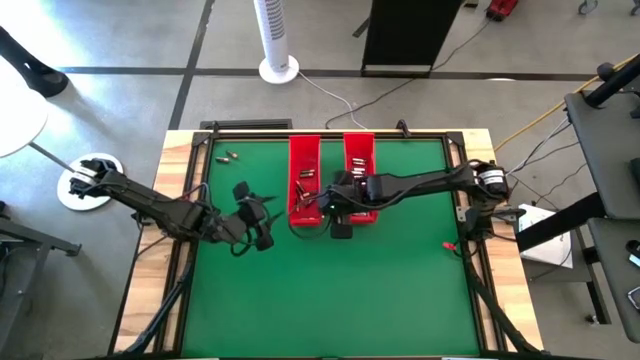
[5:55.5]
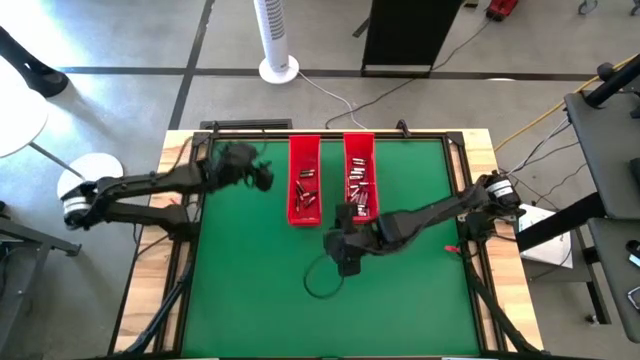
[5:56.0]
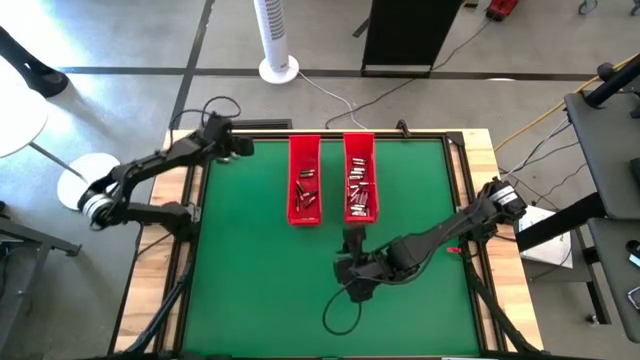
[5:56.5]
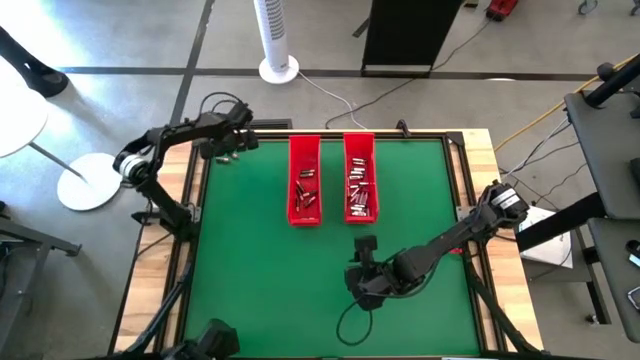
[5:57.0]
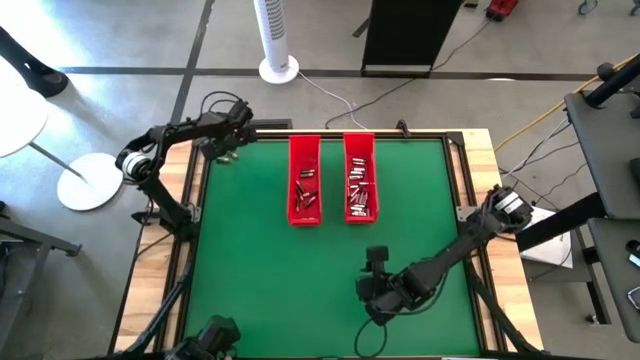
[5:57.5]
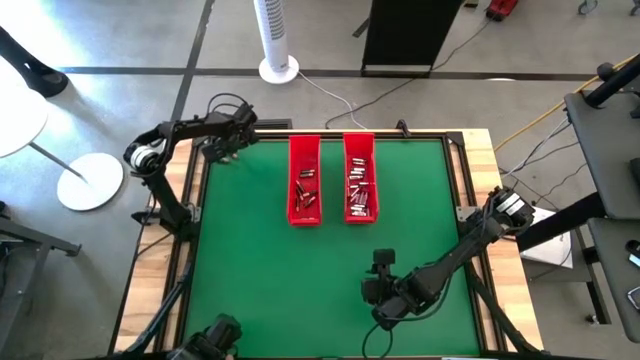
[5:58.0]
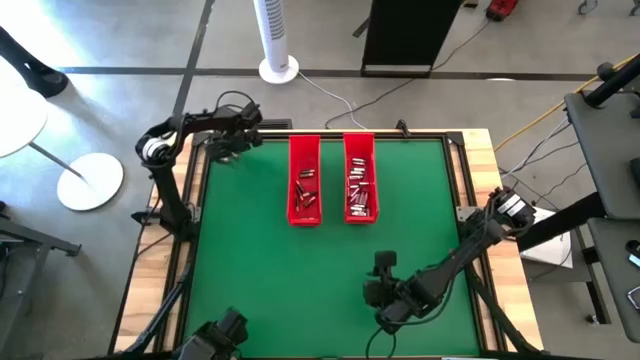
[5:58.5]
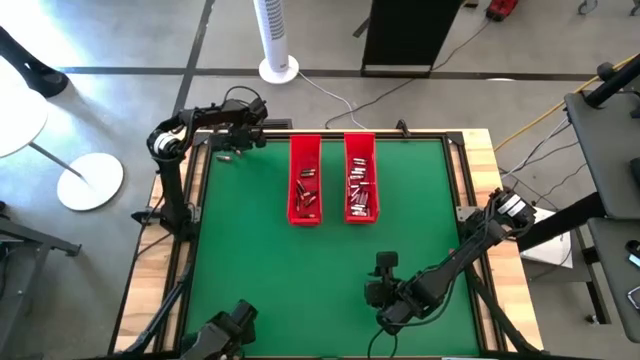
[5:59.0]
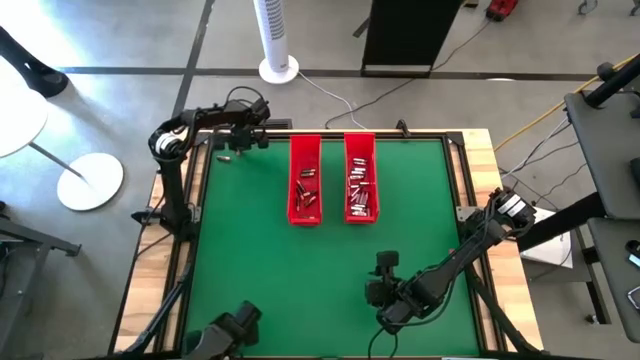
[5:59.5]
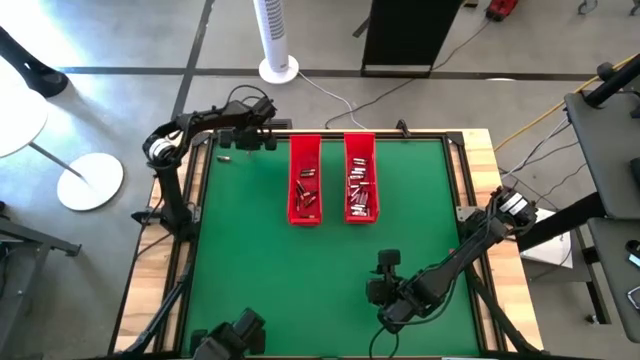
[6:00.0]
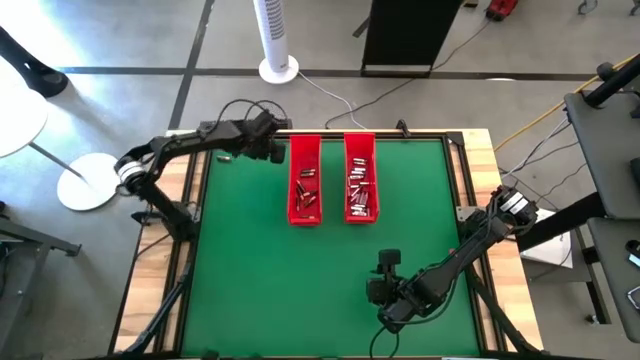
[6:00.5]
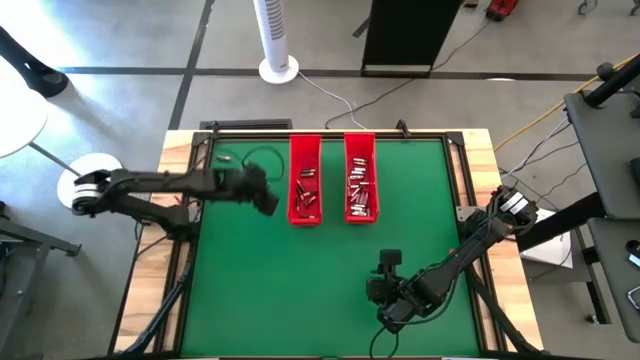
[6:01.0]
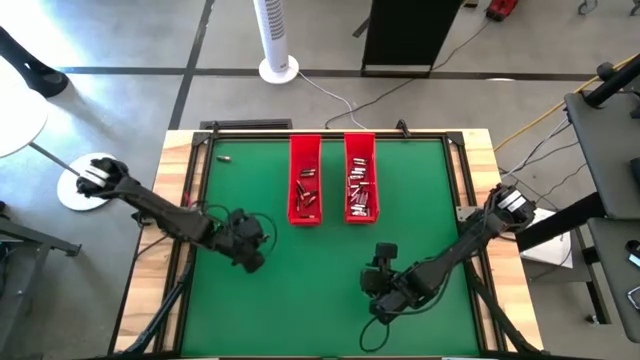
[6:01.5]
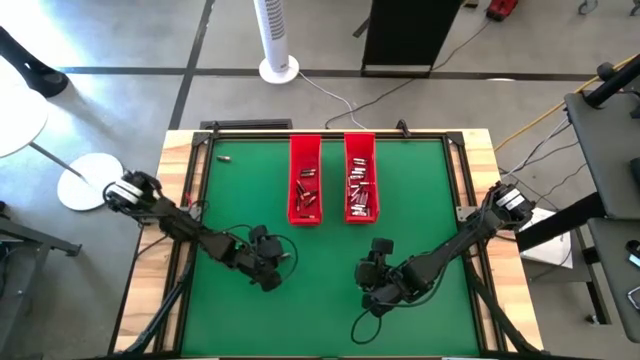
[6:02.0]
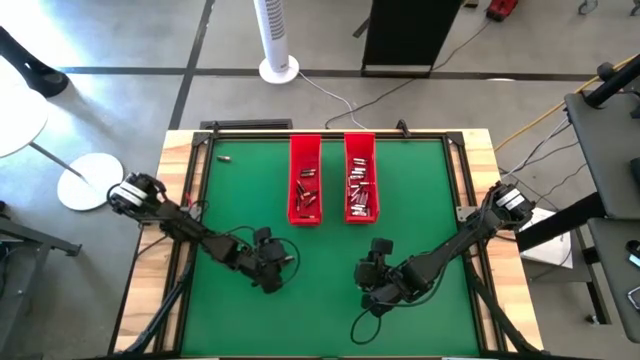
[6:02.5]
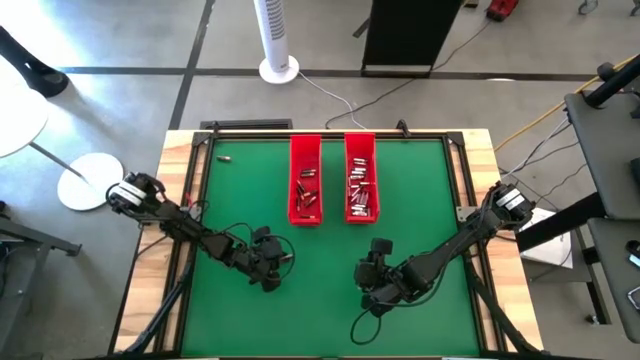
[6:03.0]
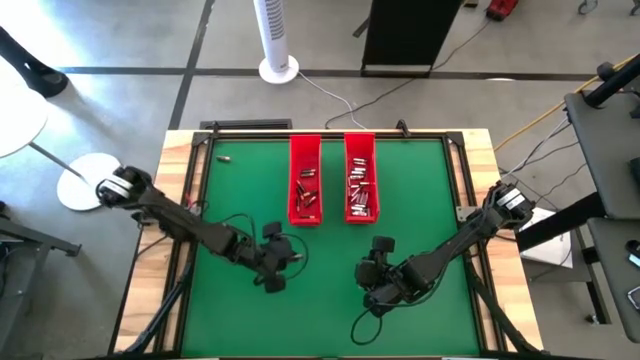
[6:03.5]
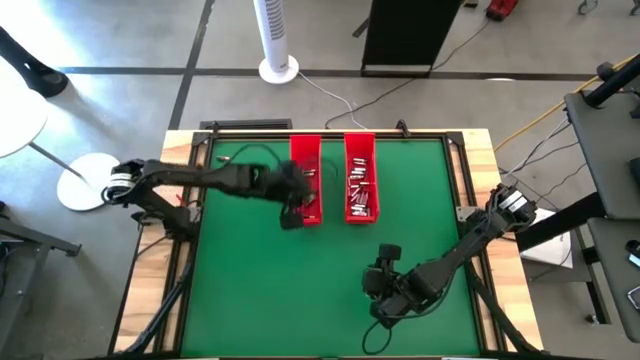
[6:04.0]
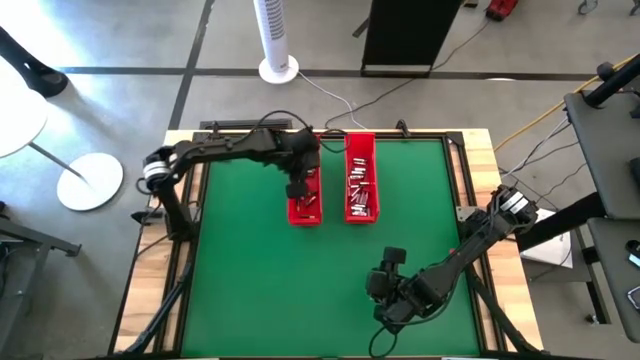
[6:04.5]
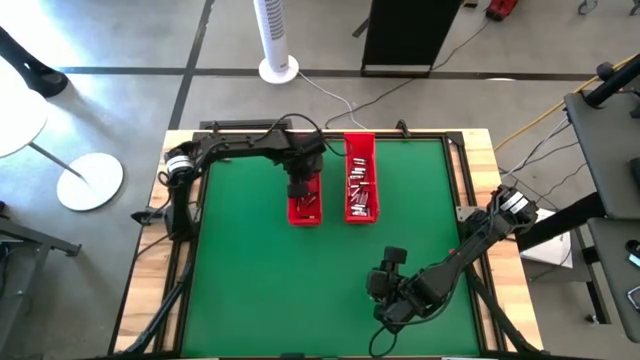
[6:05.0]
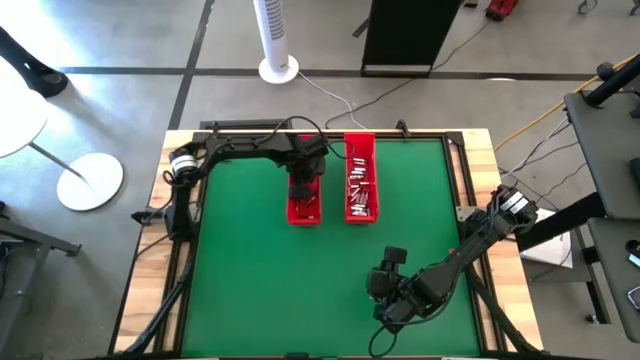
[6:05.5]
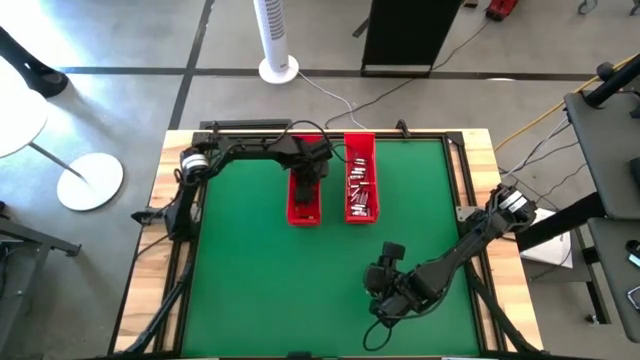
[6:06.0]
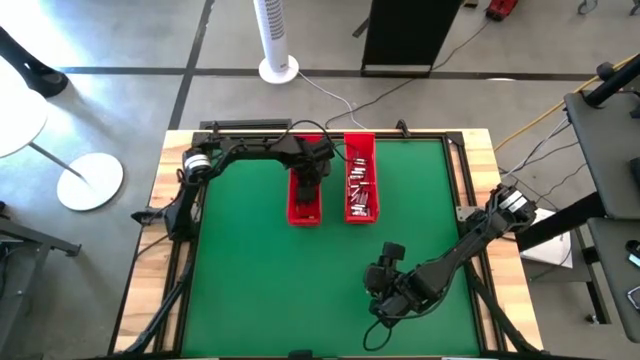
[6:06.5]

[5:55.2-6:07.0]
Task: Sort batteries
Put the black battery into the left red bin

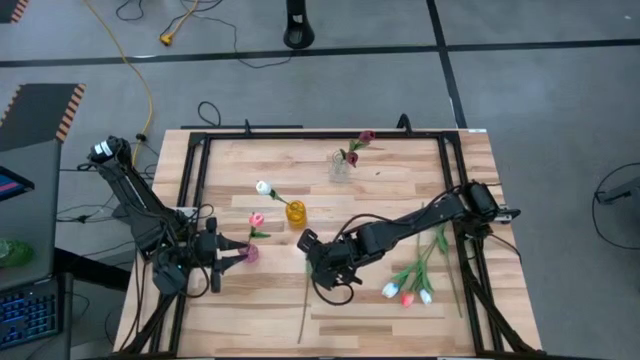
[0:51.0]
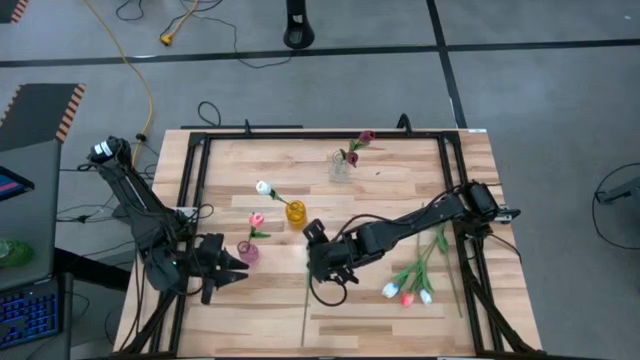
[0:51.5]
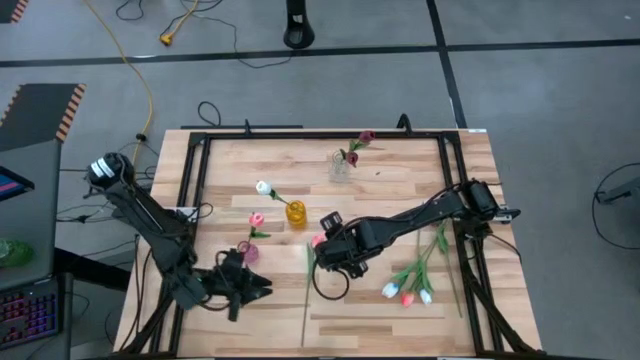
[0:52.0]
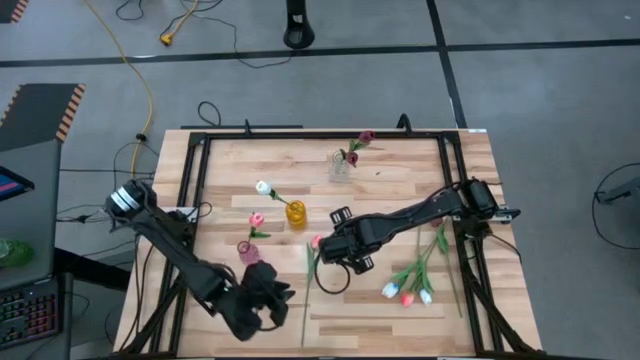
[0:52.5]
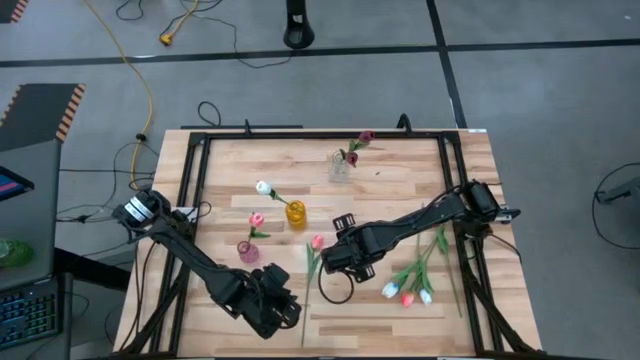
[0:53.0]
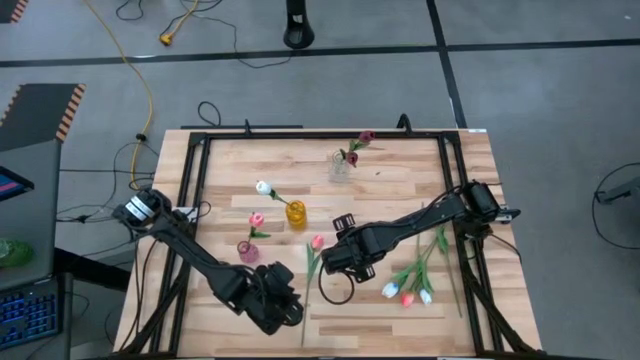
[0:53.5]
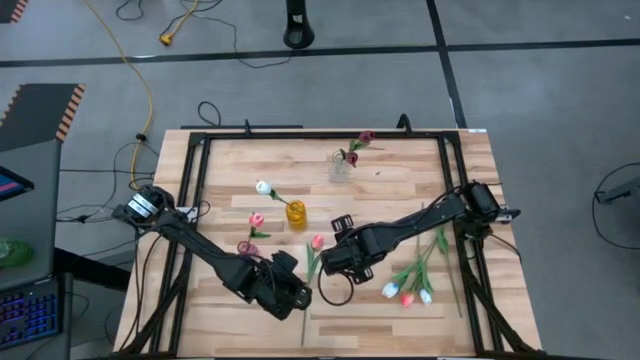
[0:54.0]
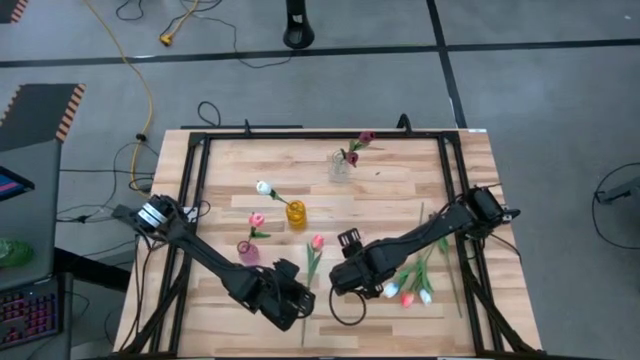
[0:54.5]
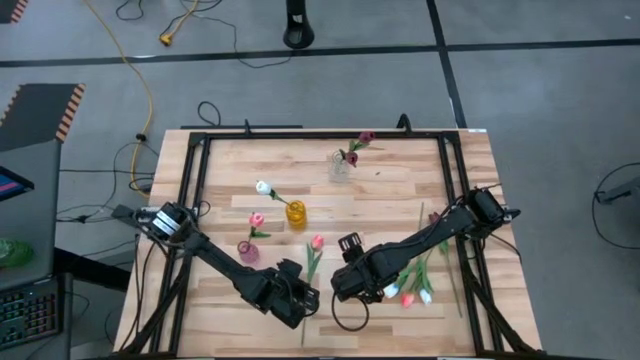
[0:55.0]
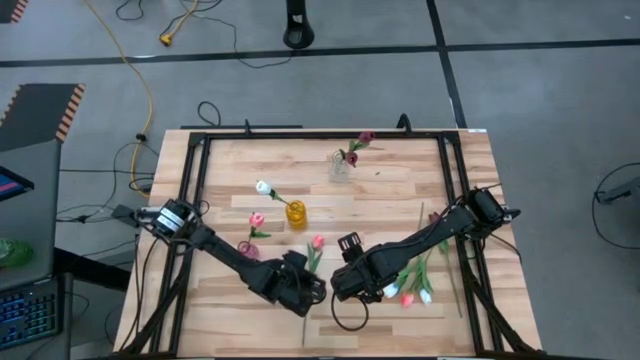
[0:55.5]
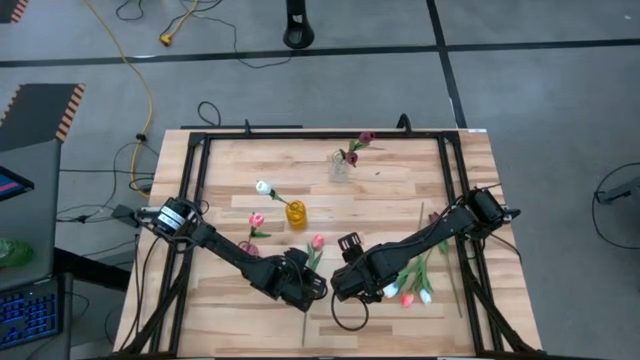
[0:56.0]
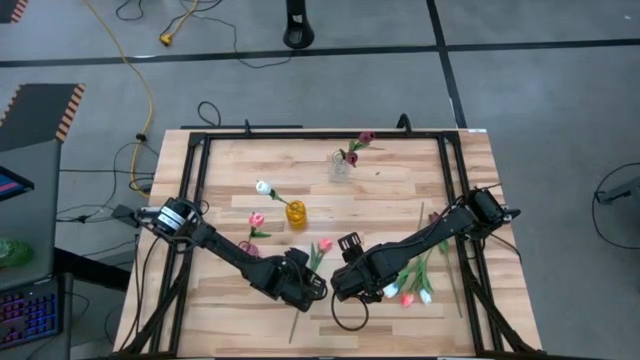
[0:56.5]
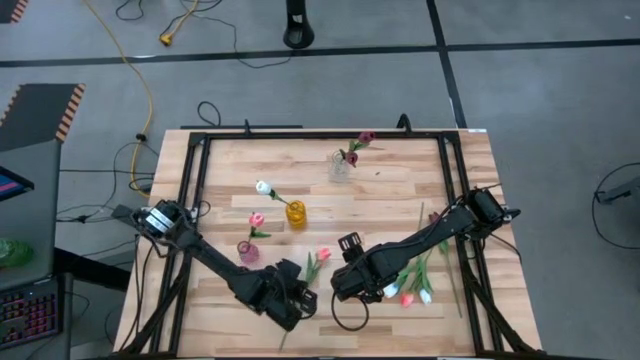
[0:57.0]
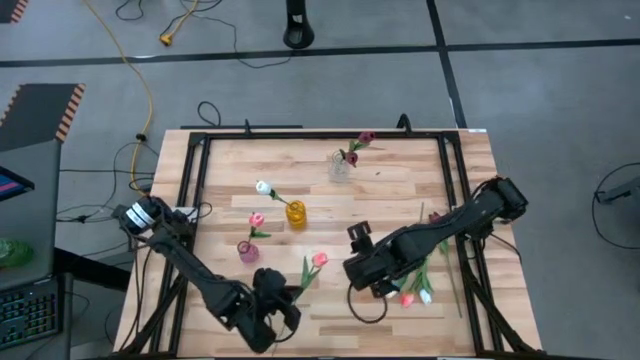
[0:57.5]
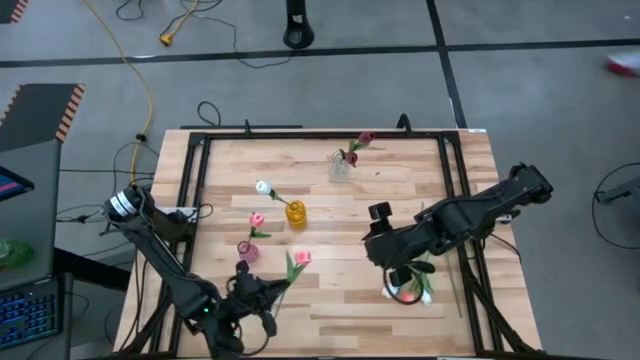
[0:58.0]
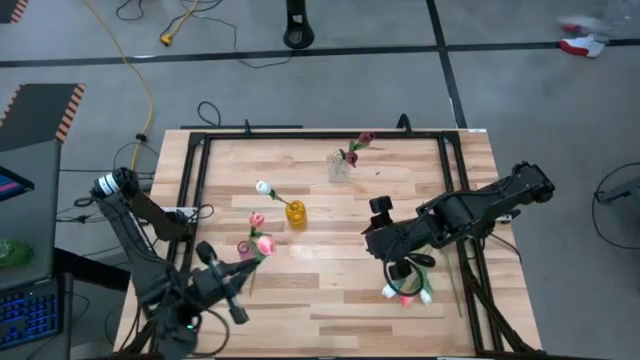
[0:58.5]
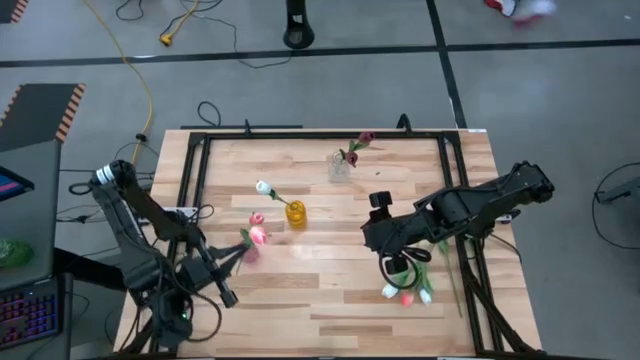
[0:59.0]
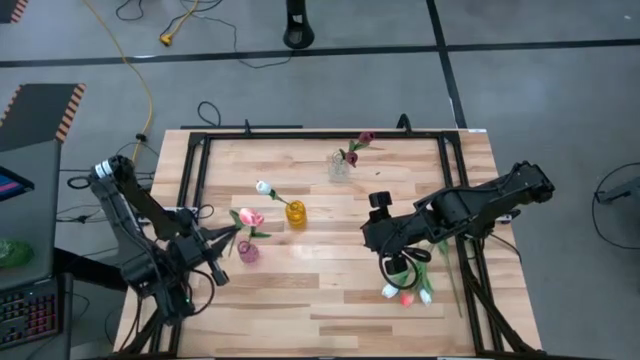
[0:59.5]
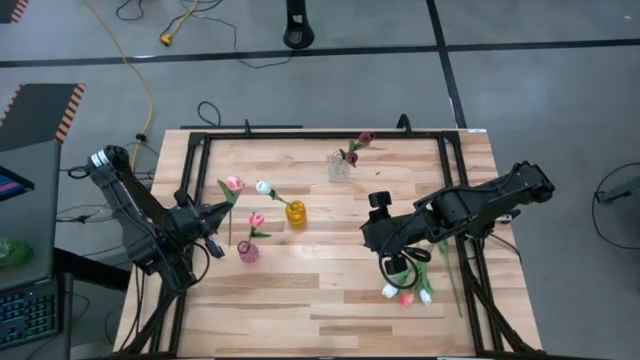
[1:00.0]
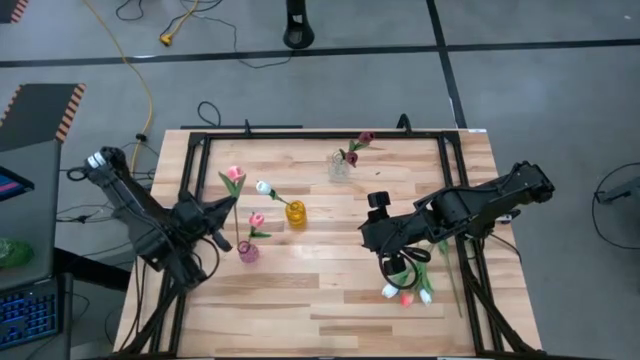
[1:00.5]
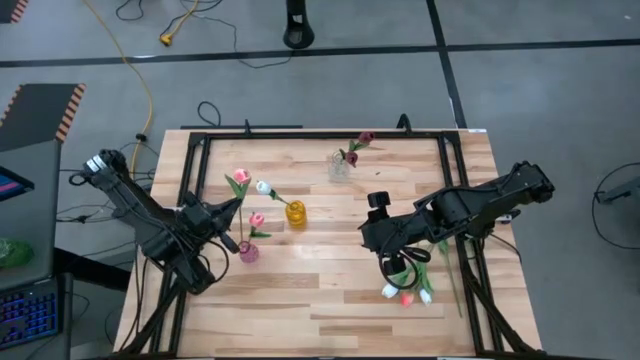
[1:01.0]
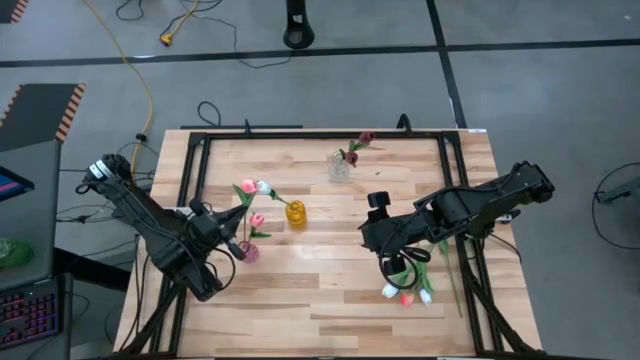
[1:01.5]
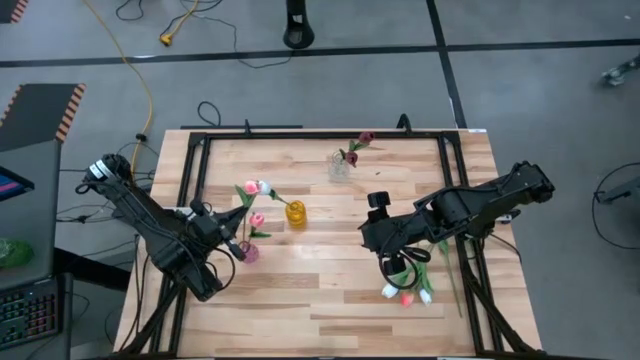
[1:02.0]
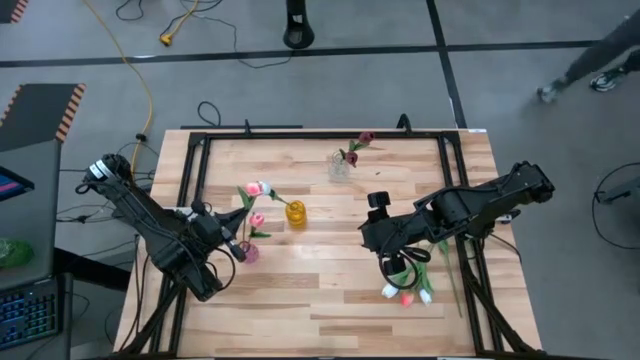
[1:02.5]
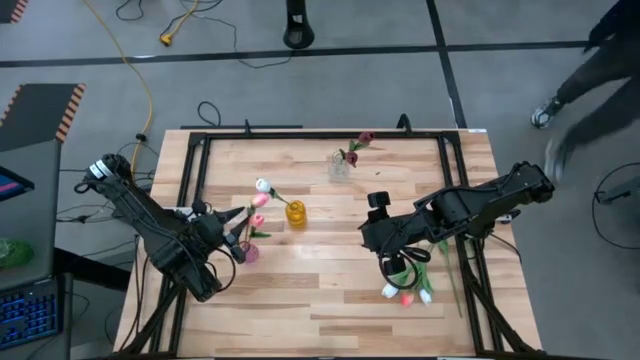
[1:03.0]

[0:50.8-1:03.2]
Task: Sort flowers into vase by color
Put the pink flower into the purple vase
